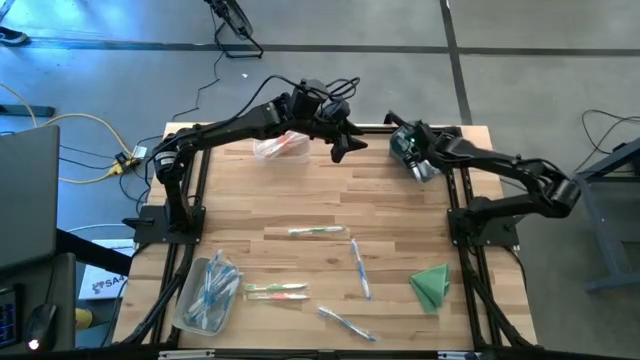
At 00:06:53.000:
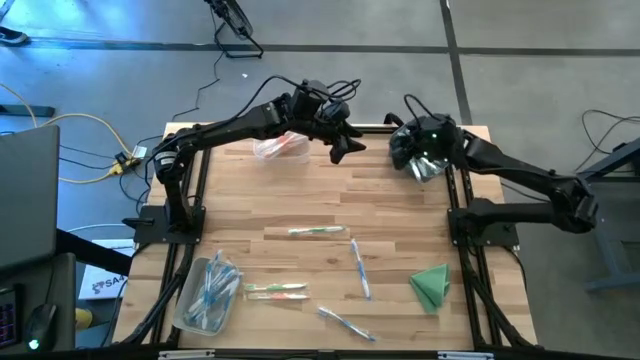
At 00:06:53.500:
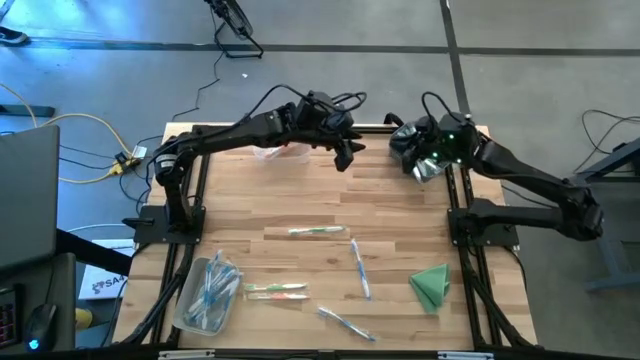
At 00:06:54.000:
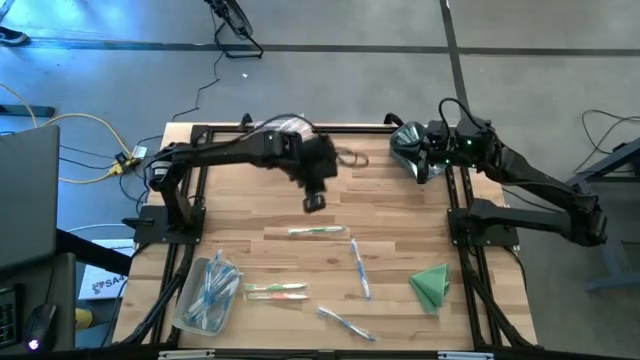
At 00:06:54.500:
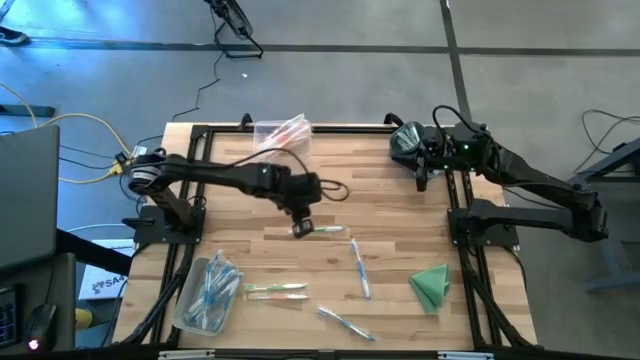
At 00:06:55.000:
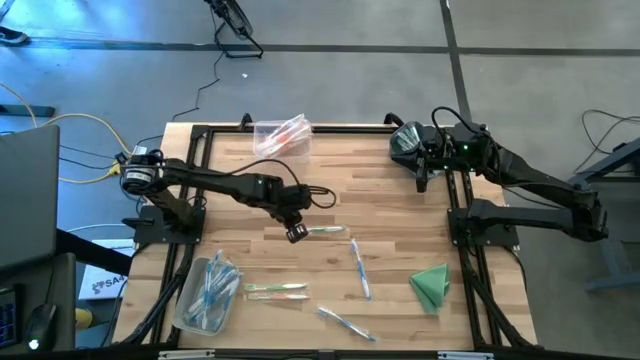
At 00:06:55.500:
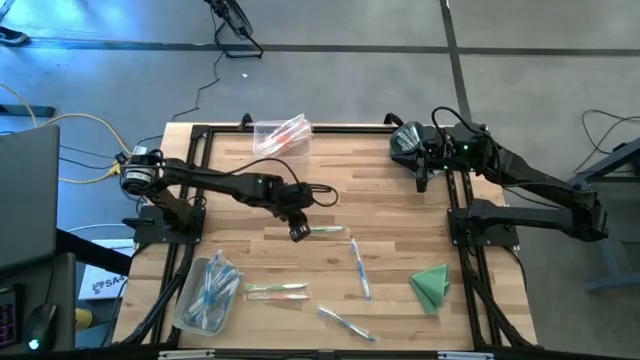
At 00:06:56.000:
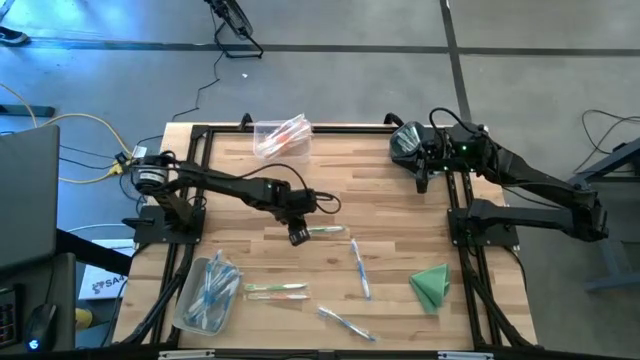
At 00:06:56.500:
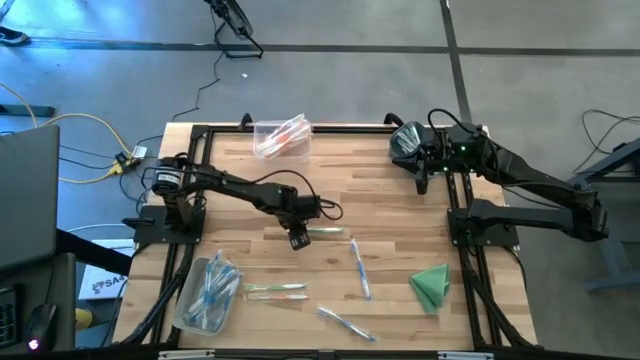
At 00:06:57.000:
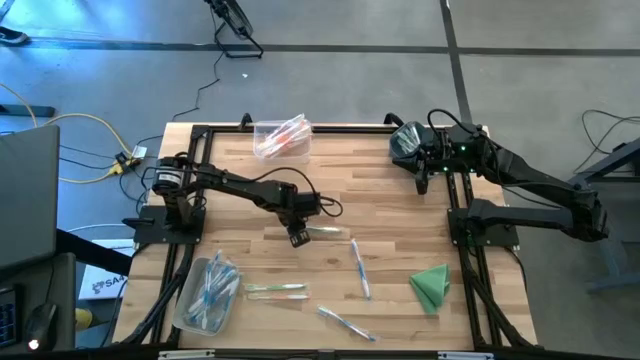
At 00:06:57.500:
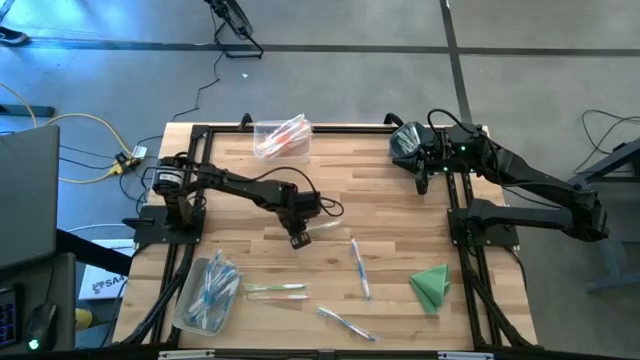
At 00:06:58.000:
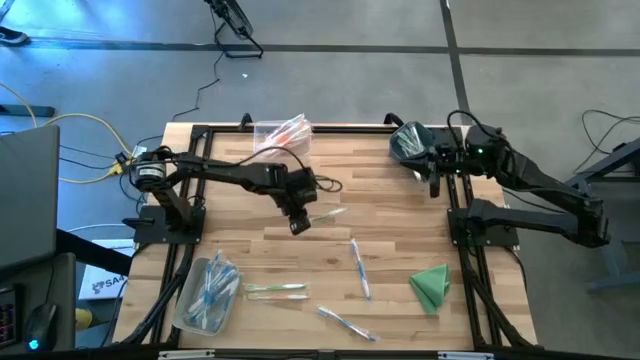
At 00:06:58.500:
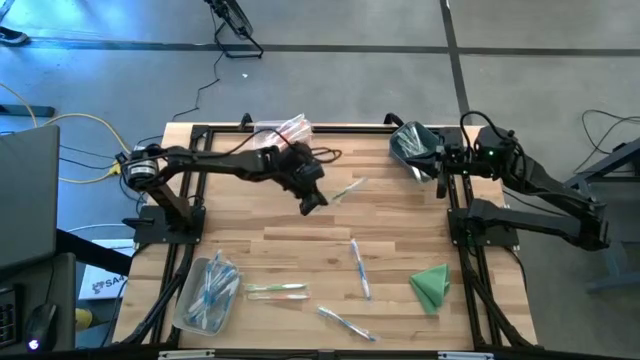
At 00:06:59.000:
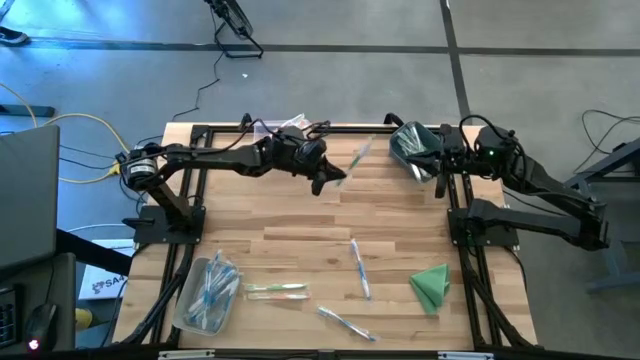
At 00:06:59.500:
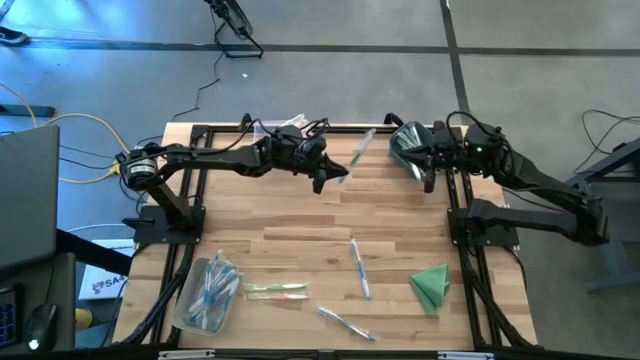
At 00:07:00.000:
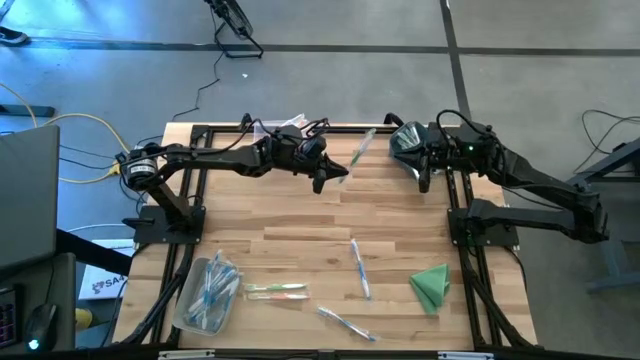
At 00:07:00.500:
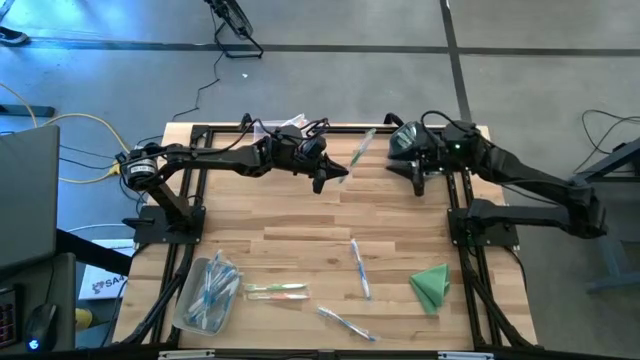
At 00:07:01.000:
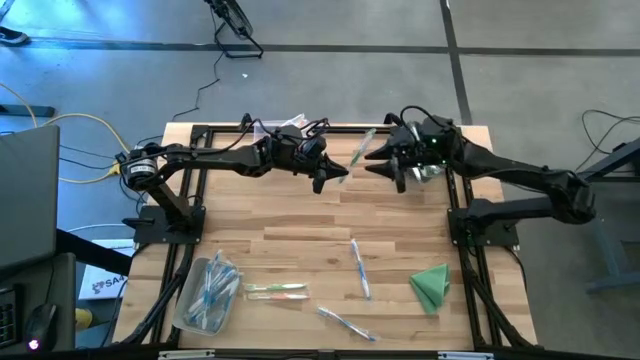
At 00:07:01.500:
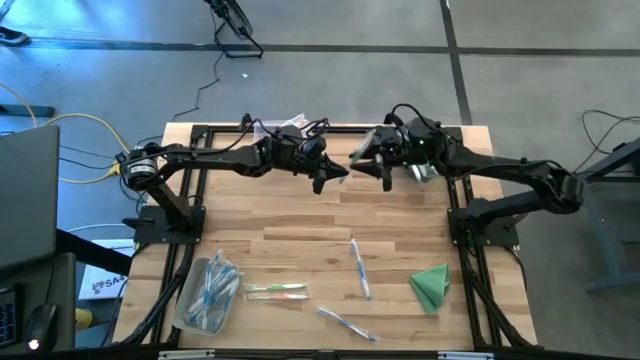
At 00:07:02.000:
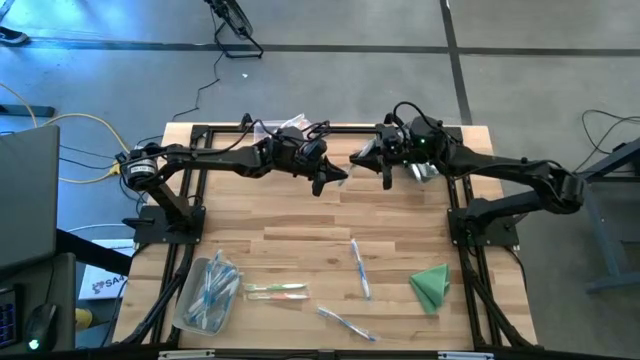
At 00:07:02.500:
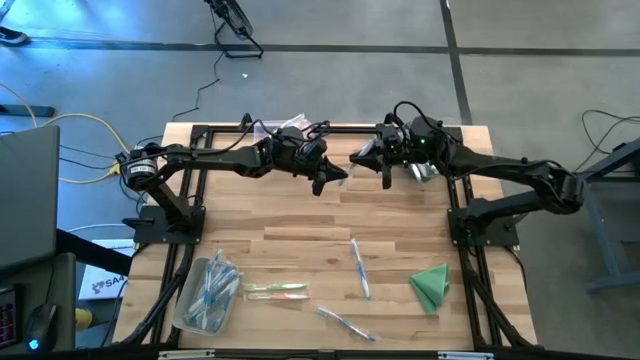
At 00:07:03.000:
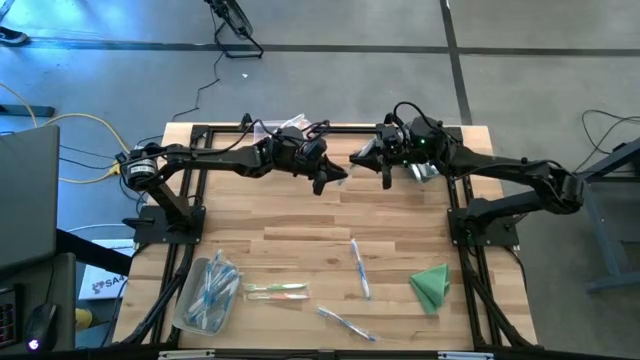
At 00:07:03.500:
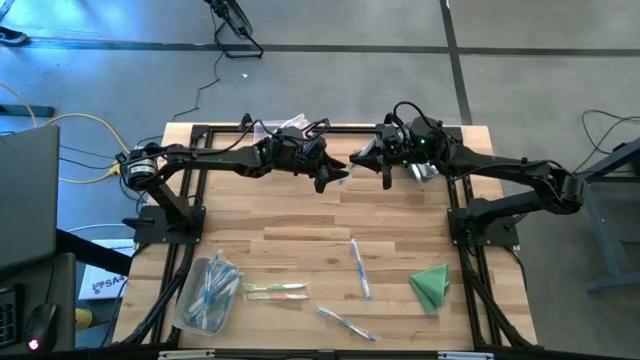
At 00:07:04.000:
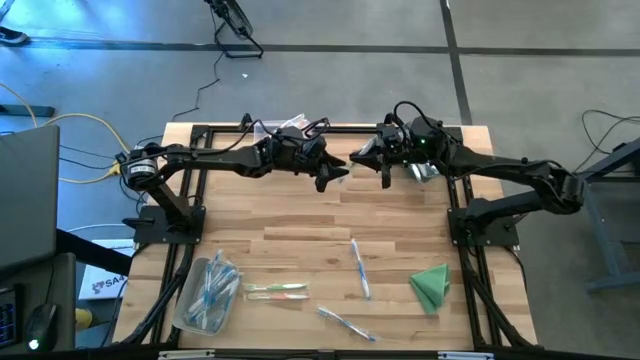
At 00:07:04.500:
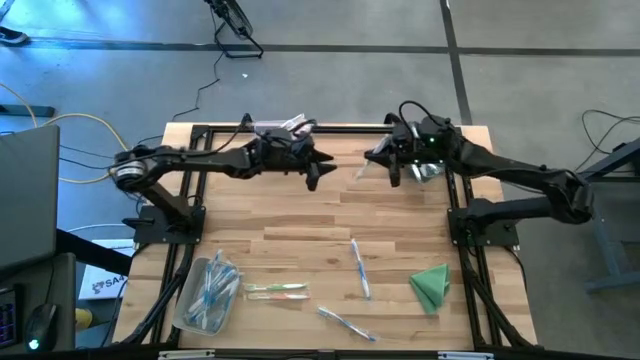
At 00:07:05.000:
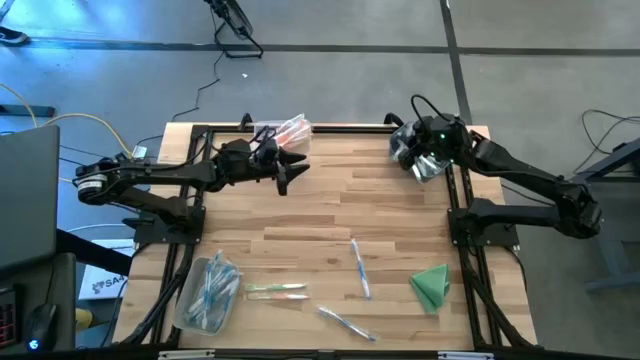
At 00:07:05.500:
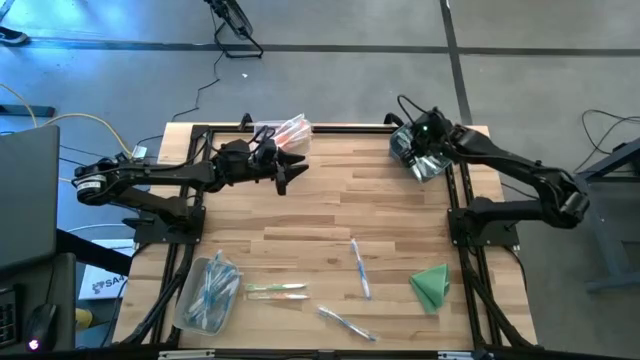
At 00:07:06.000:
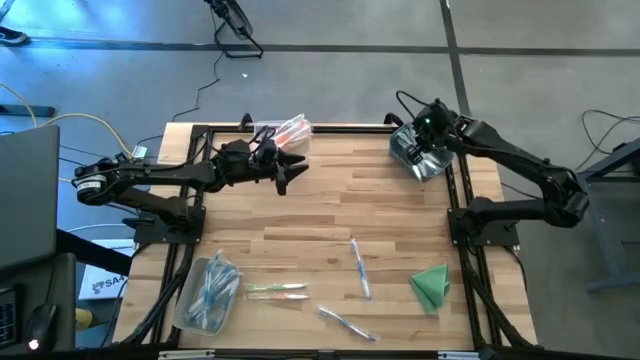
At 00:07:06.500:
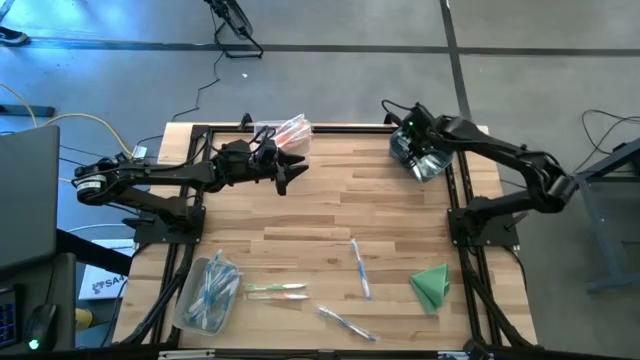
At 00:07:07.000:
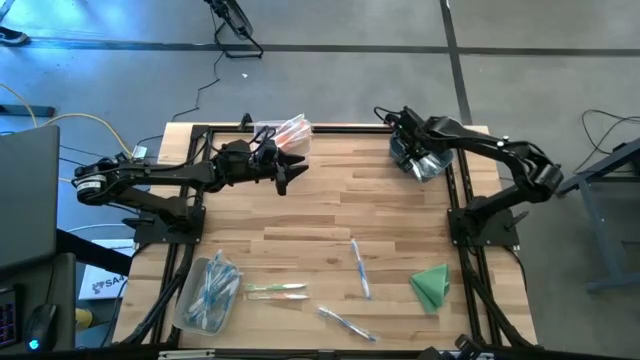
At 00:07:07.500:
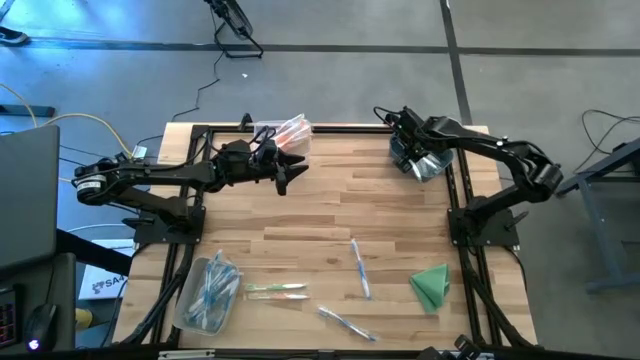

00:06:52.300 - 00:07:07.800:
Task: Pick & Place Toothbrushes
Put the top green toothbrush into the blue bin
